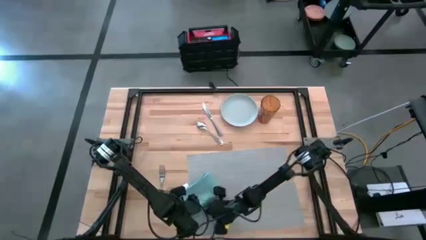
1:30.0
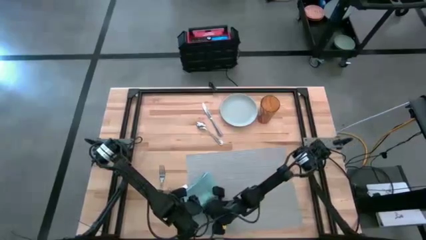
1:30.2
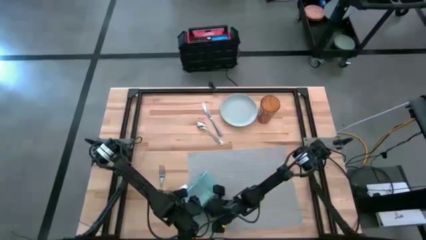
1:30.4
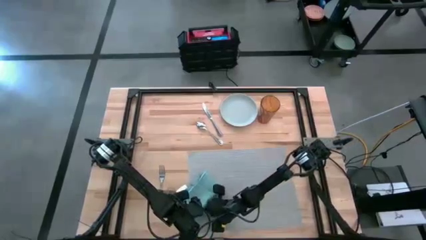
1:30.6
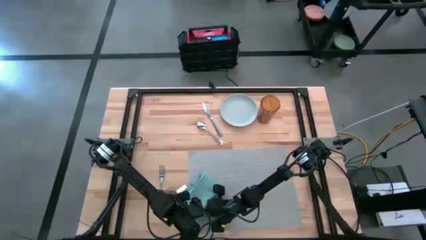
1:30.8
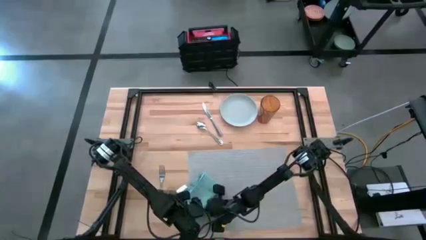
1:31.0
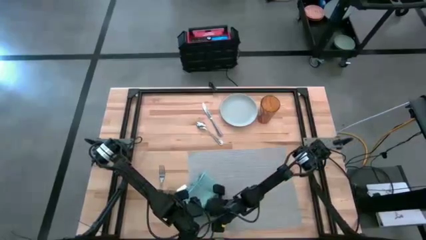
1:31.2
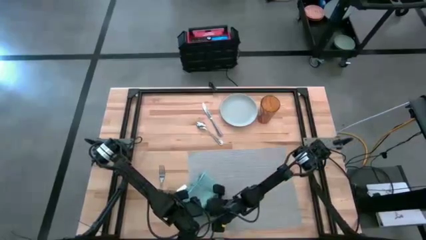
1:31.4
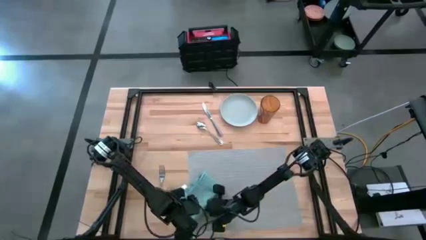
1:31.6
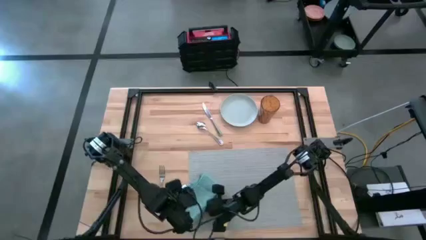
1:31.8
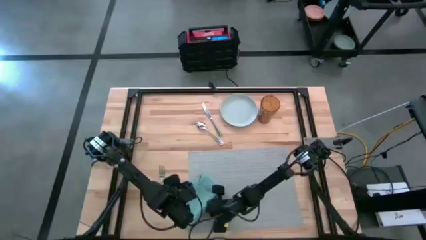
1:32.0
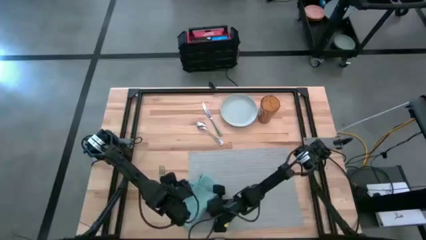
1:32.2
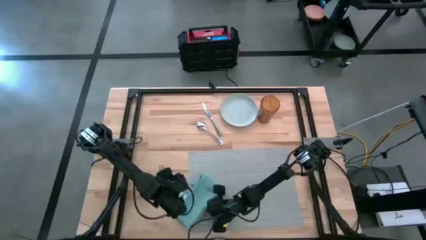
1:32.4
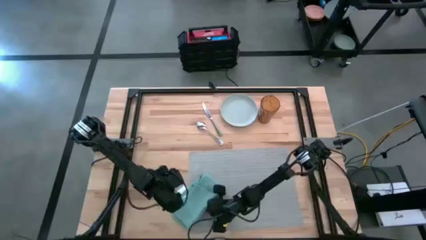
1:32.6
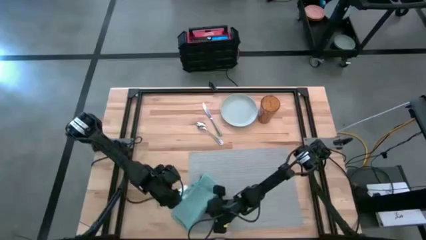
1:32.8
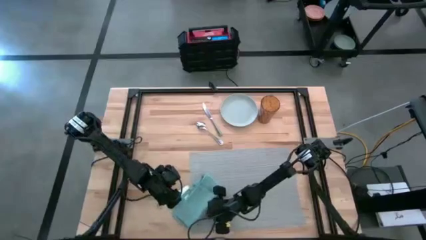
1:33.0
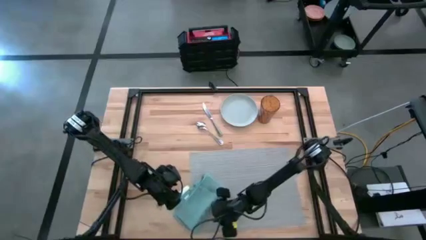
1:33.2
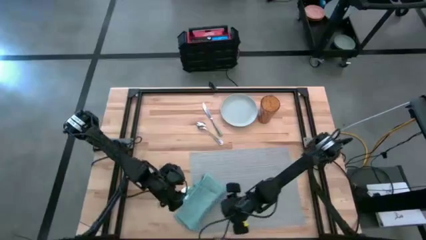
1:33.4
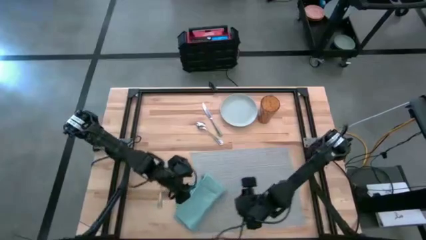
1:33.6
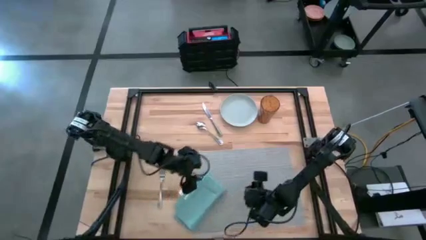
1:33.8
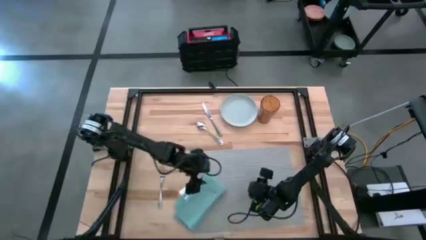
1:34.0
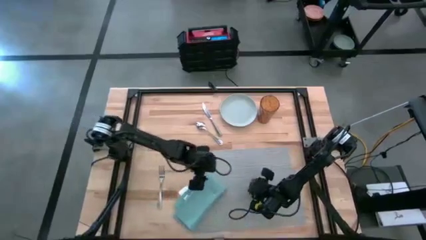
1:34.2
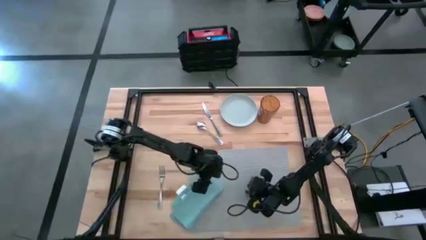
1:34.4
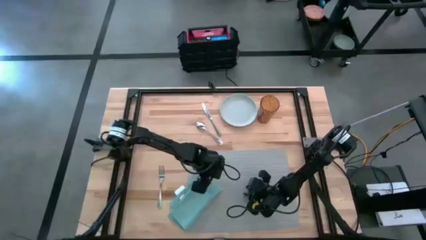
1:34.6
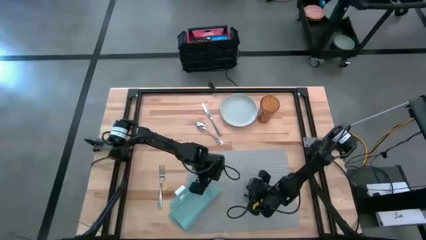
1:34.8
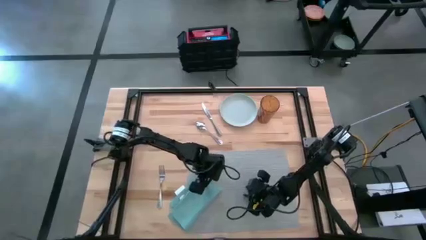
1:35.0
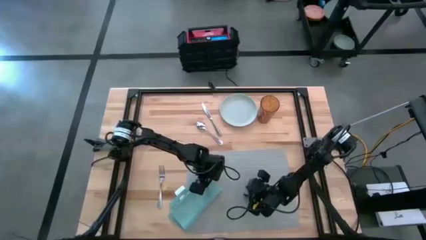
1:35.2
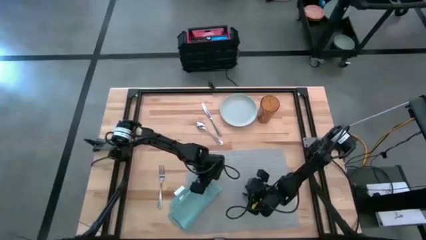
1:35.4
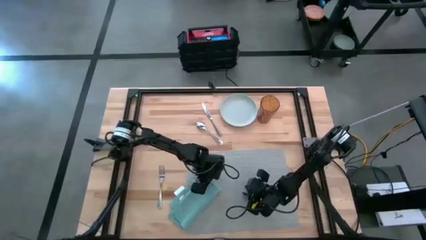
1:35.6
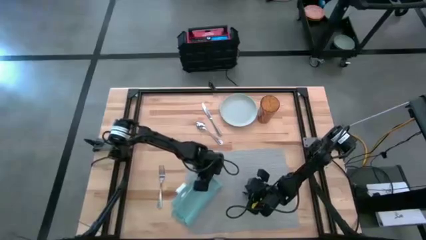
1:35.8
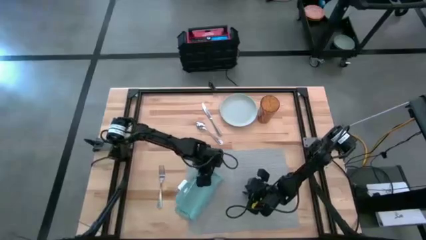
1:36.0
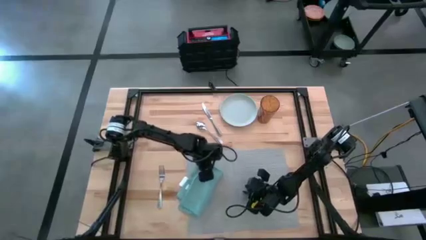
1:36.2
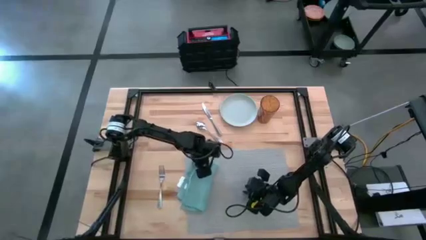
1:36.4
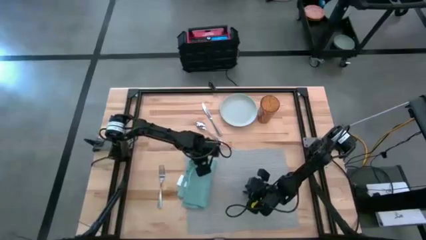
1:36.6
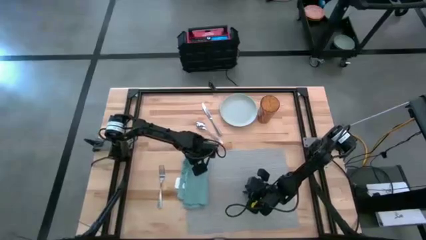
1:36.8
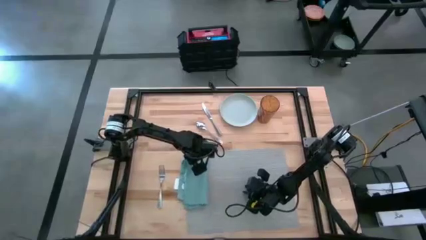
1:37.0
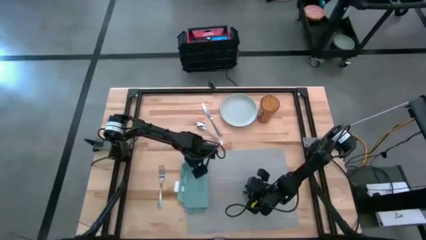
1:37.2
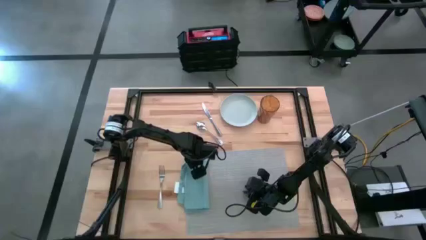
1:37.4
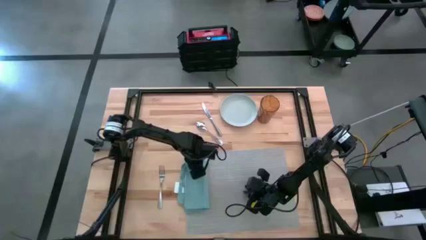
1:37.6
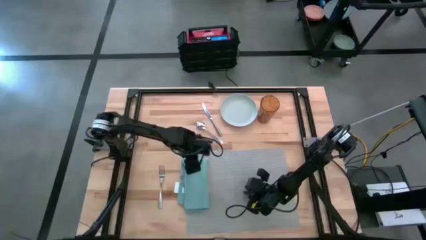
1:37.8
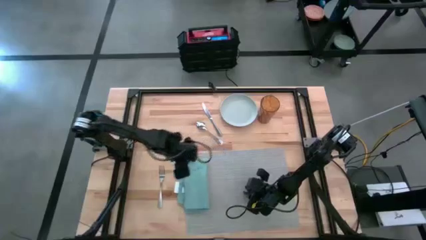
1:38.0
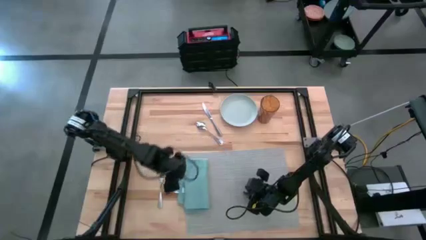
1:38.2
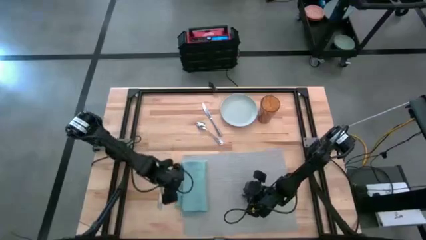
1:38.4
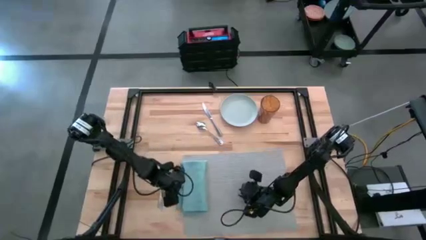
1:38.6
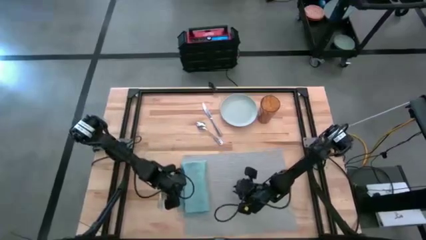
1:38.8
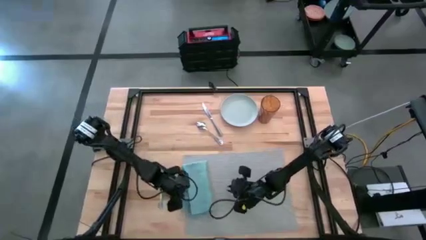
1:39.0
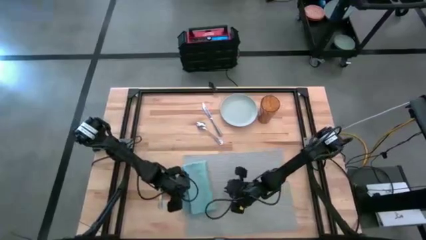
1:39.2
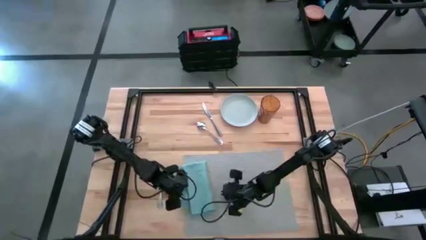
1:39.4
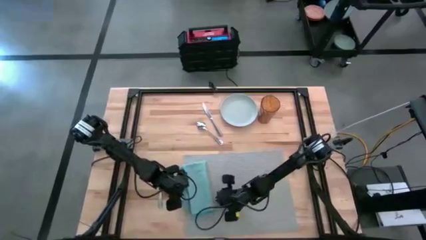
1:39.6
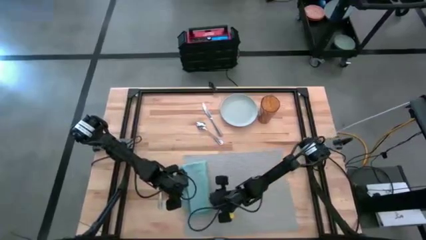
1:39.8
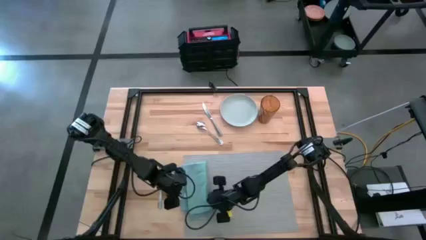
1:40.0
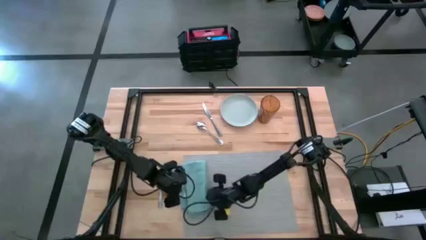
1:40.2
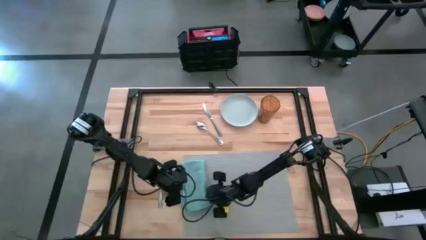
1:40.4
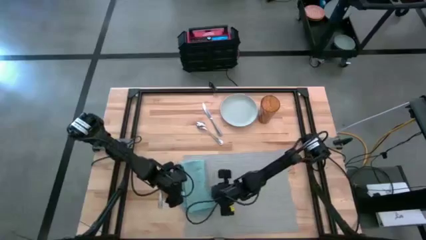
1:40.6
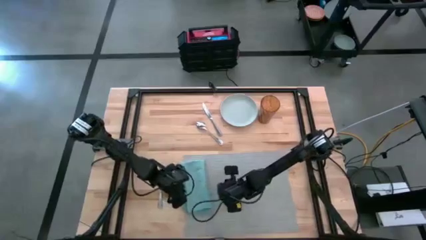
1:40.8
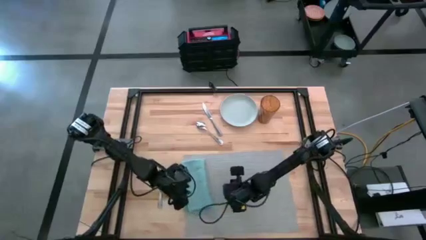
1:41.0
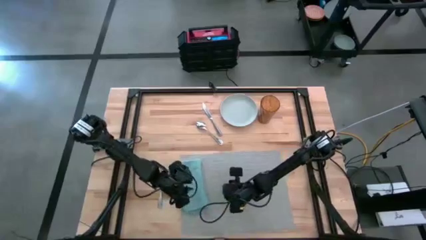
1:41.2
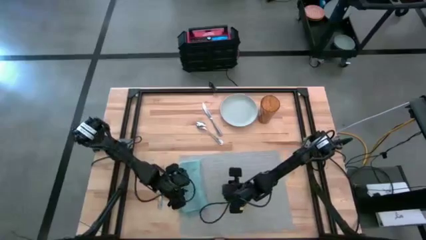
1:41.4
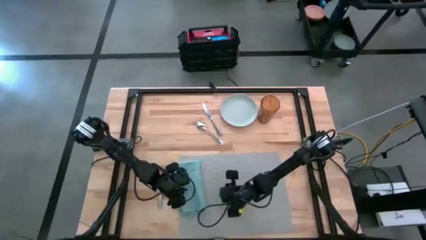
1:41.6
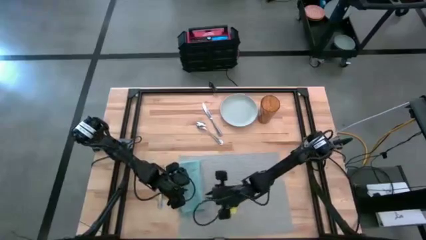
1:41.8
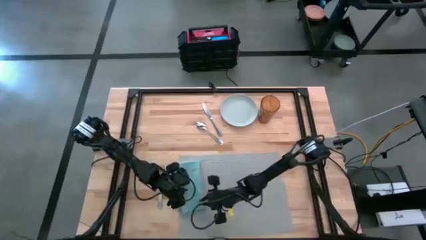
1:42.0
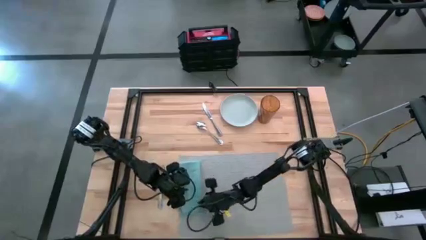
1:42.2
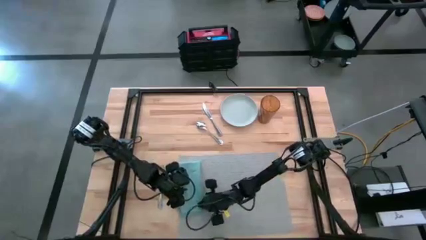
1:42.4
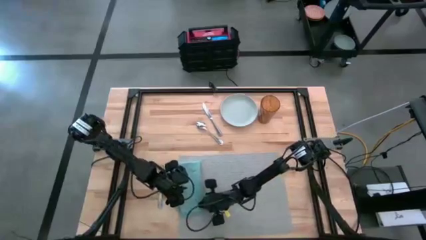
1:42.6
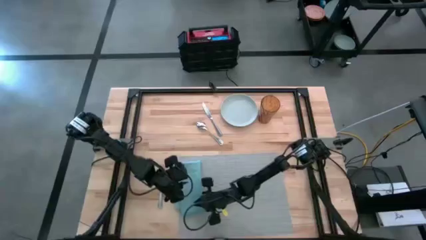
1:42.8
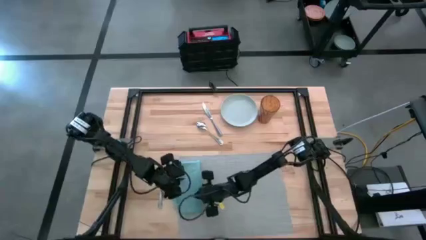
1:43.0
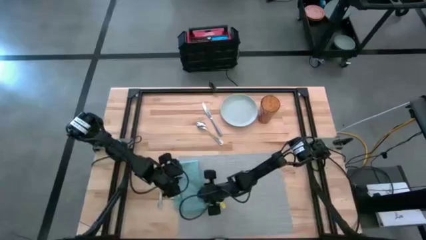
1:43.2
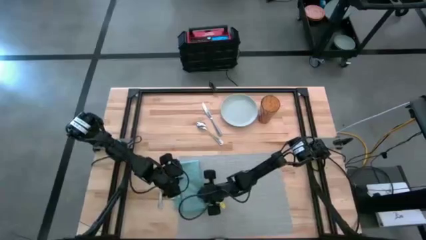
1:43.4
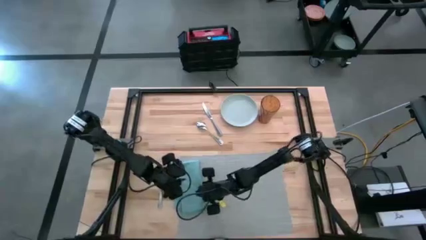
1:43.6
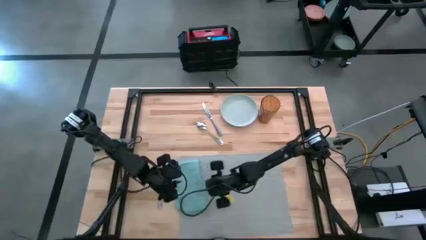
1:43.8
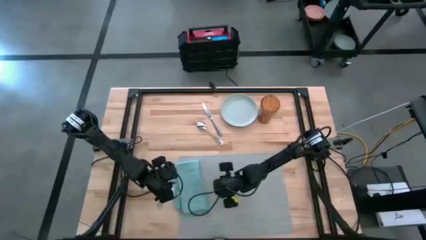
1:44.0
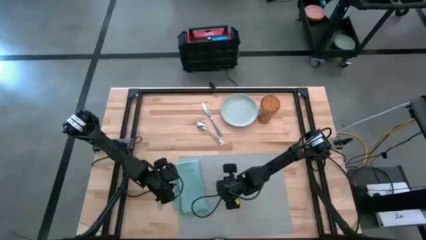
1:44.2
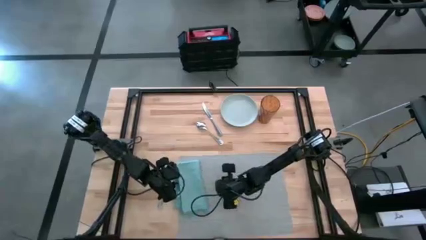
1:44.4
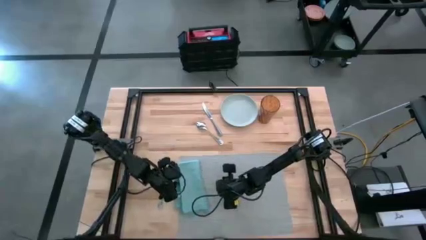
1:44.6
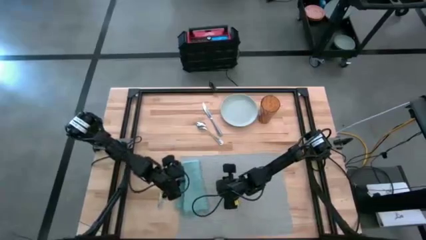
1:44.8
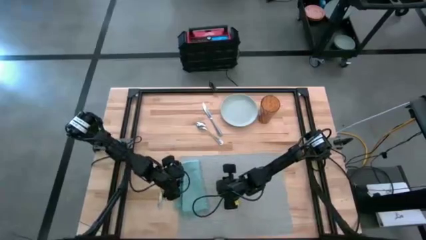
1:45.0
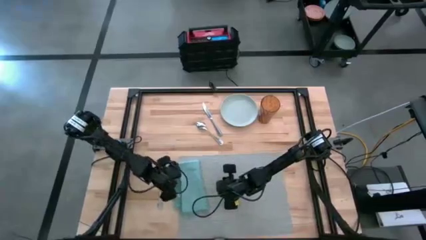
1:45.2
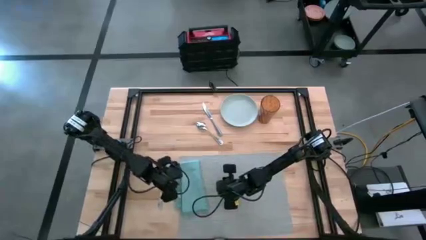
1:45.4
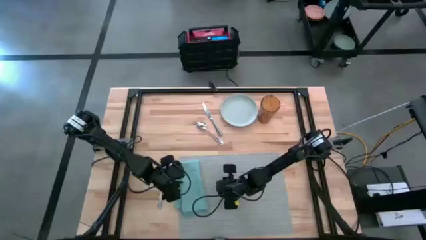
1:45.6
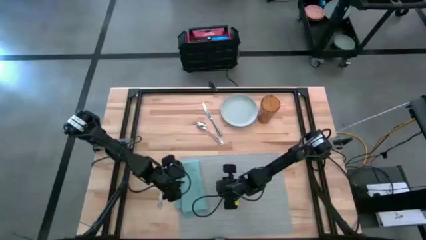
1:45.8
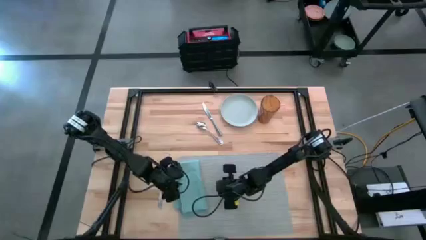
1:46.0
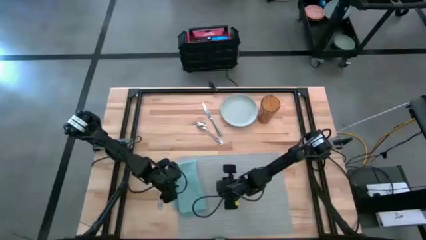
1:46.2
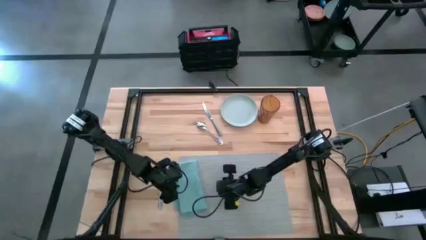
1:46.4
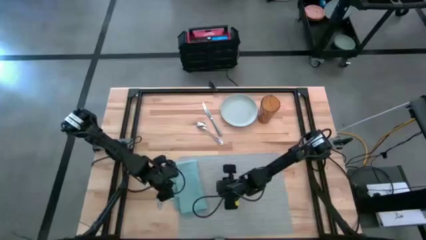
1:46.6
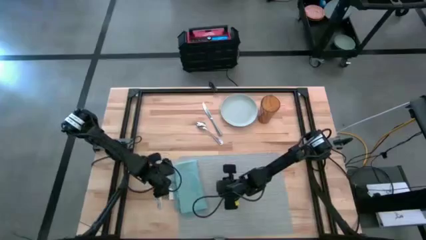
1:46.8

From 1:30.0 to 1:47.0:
Task: Set table place
Fold the blue napkin on the gray placemat
